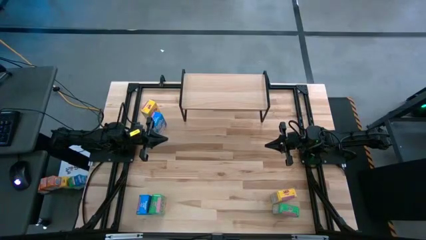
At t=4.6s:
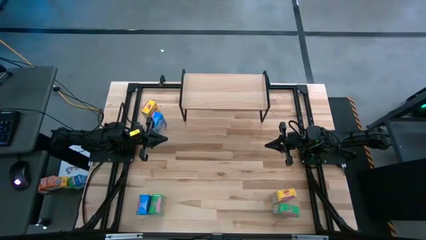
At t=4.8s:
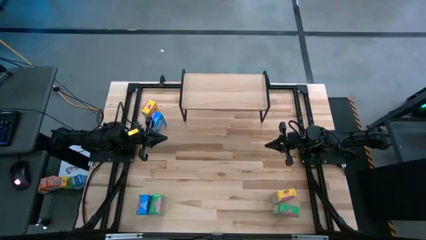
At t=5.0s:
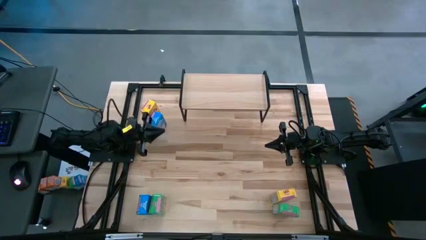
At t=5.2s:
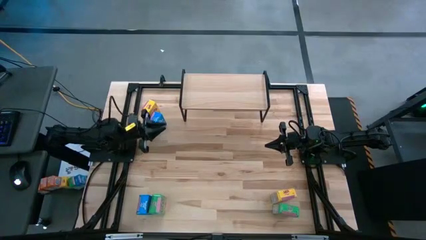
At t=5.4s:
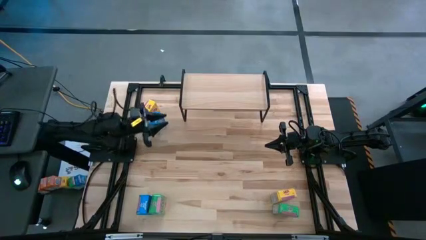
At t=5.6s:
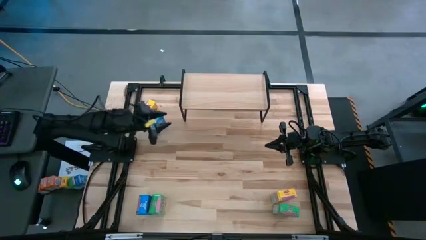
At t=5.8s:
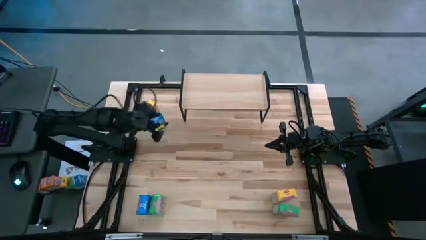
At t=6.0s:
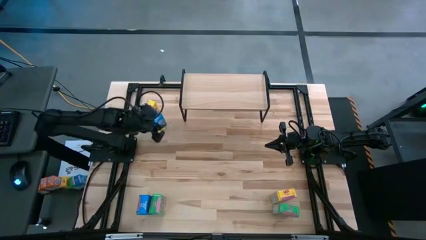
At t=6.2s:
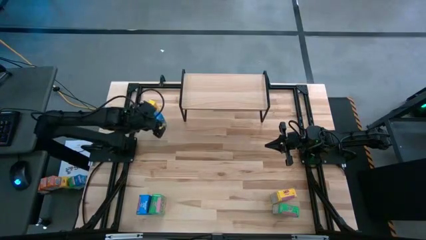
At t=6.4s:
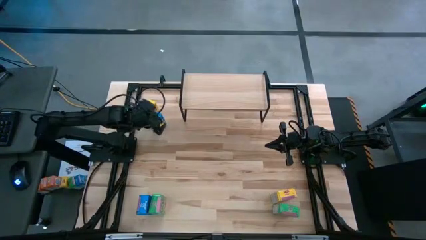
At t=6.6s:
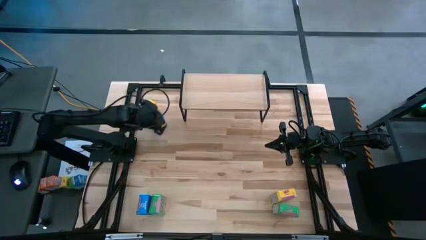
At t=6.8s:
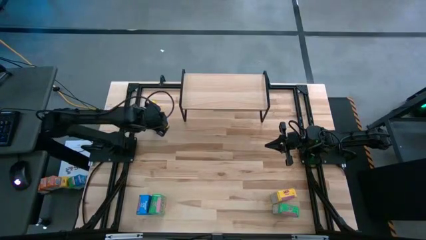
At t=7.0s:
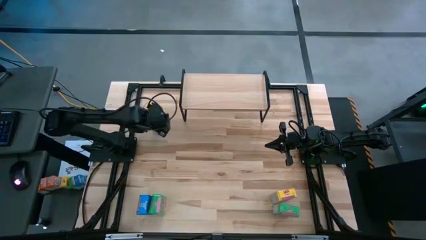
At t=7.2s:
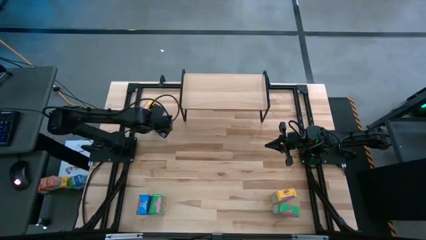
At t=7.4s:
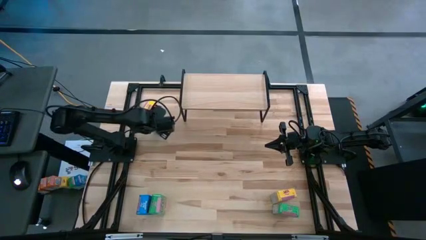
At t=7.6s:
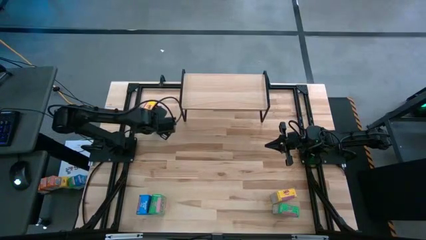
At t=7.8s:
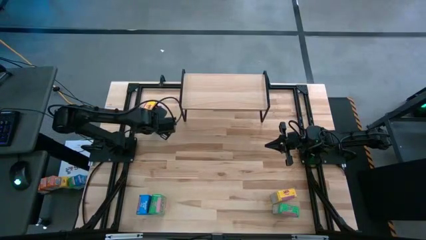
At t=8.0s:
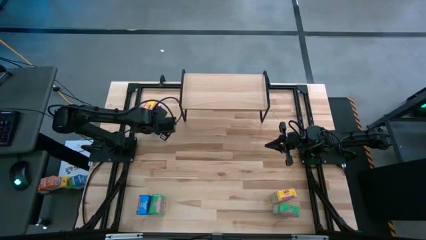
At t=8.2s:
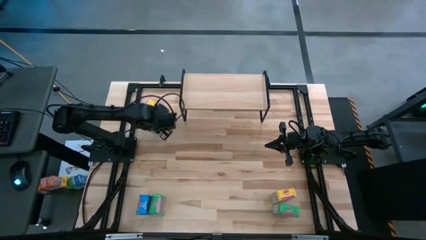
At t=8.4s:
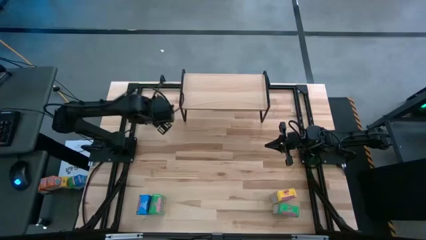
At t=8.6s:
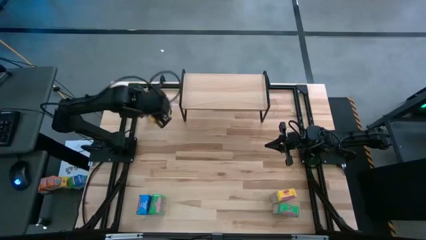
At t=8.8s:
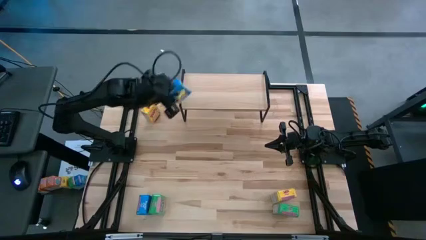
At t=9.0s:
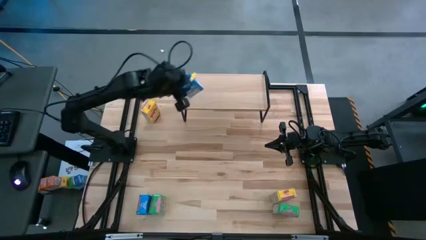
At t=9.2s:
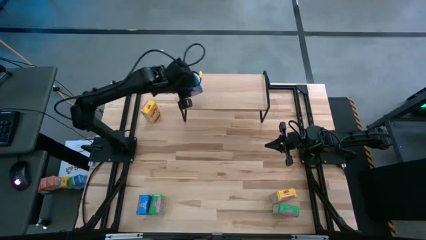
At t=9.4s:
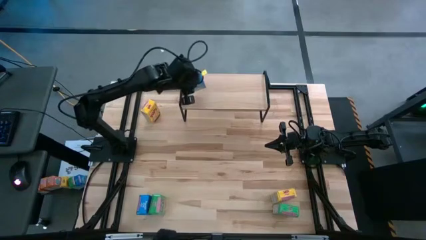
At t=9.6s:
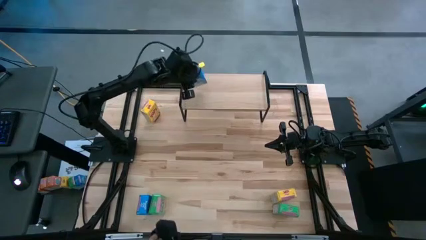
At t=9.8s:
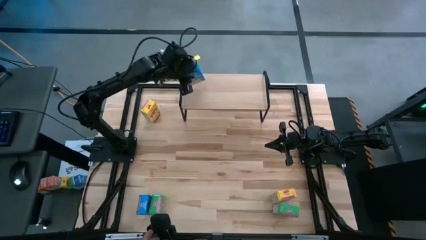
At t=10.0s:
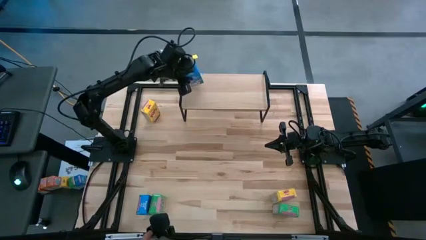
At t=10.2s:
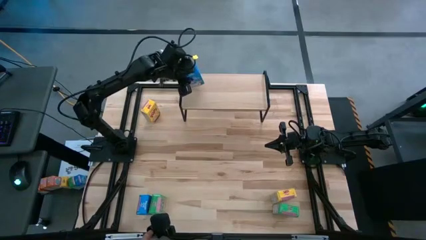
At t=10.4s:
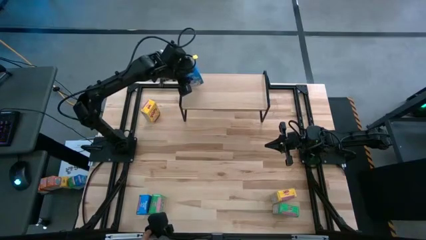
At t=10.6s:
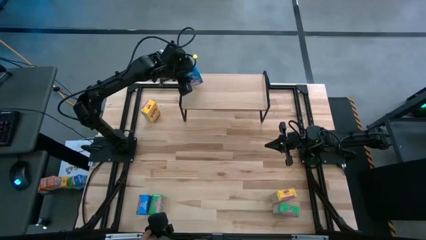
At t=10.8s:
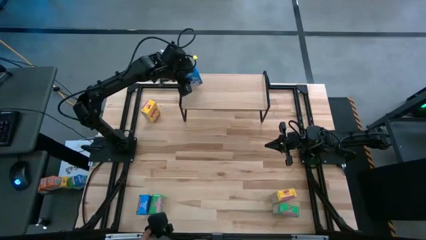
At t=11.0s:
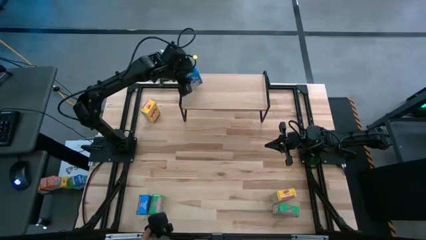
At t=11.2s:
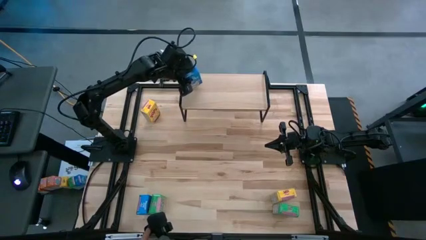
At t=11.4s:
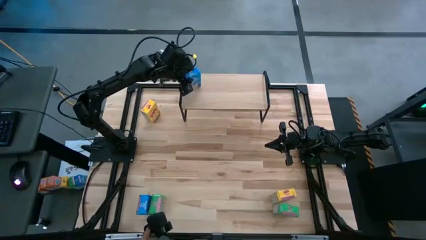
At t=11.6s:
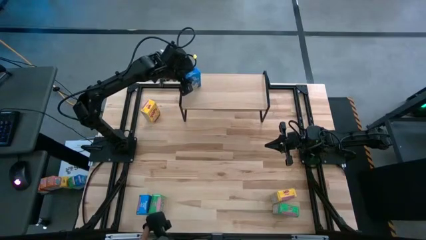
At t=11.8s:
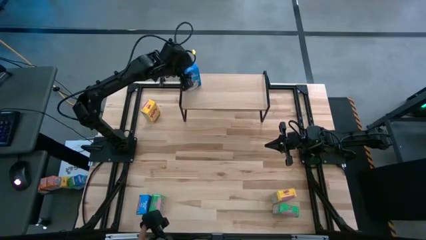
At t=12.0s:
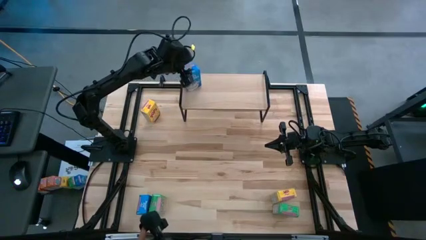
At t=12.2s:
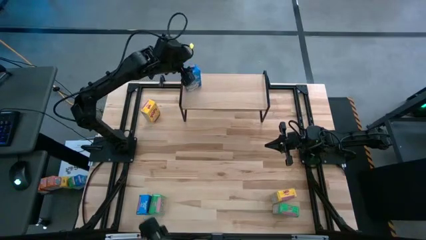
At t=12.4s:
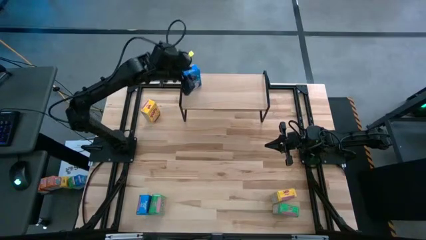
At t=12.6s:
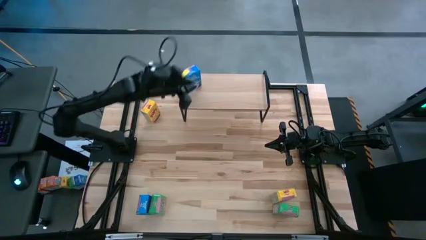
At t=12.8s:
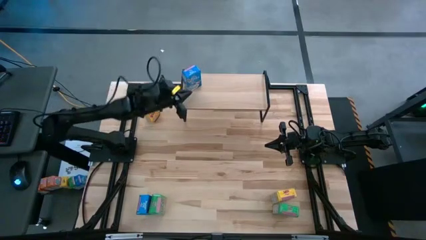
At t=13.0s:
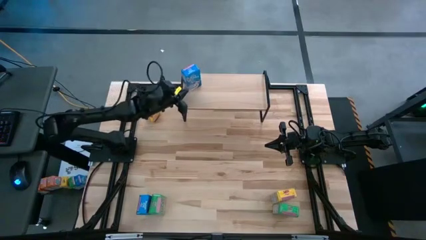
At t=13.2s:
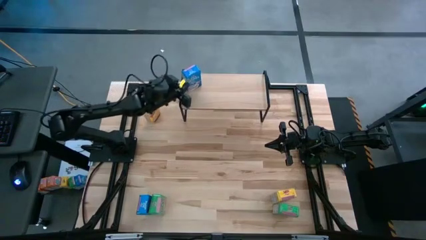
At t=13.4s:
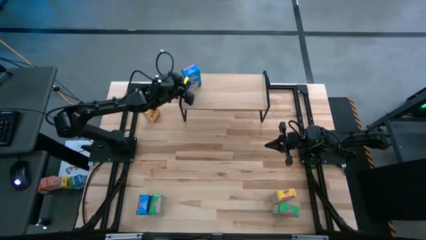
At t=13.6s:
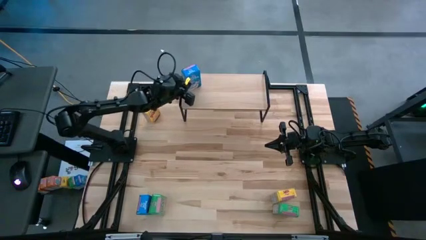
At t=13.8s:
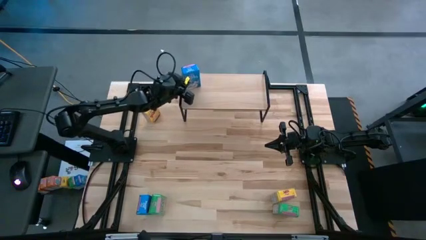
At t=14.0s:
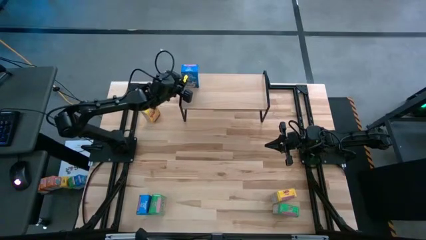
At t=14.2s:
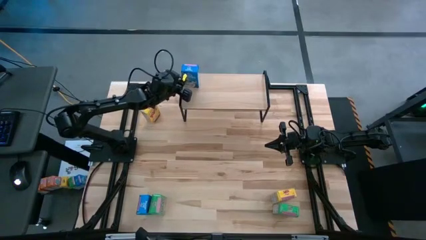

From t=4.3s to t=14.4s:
Task: Stack cereal on shelf
Put the top blue cereal box on the shelf
